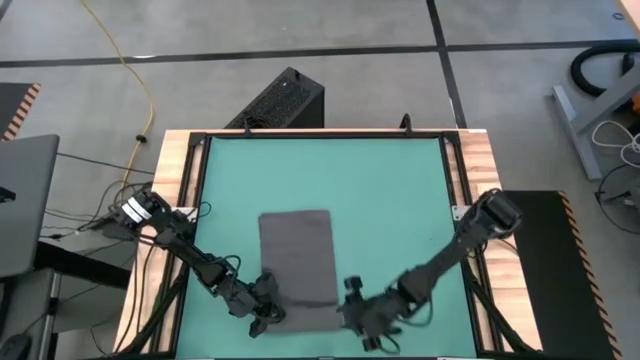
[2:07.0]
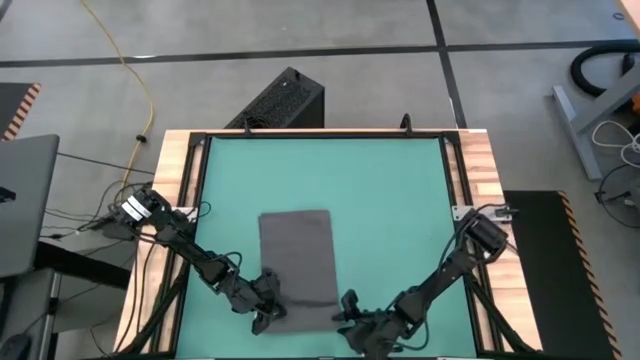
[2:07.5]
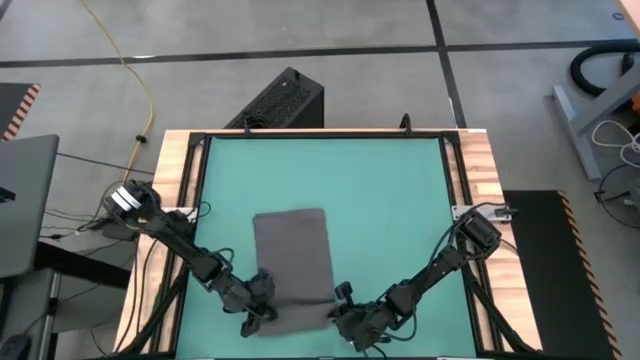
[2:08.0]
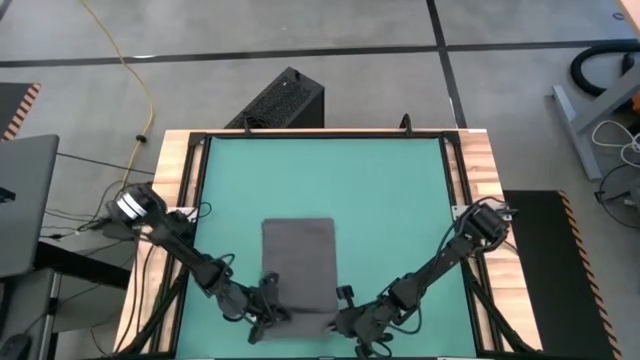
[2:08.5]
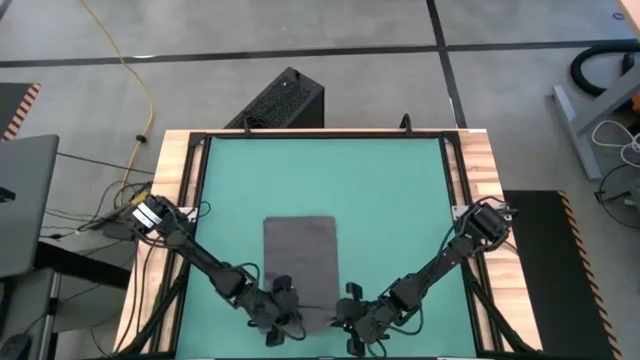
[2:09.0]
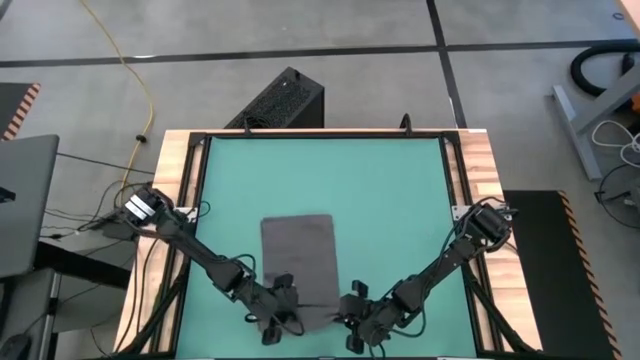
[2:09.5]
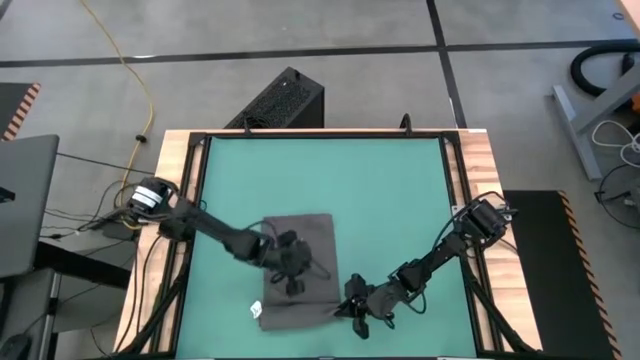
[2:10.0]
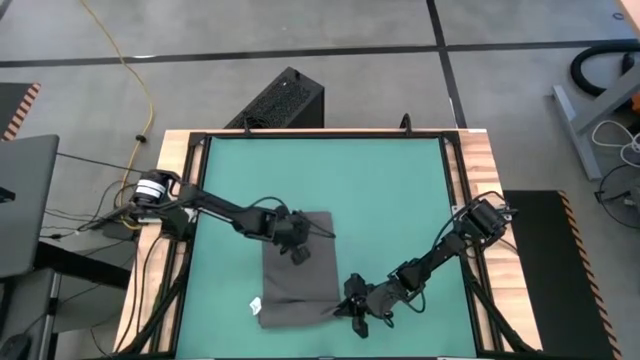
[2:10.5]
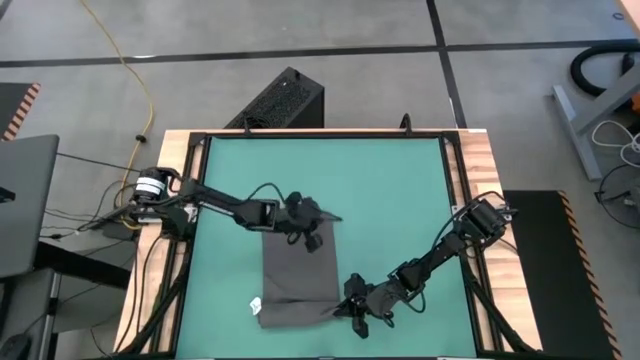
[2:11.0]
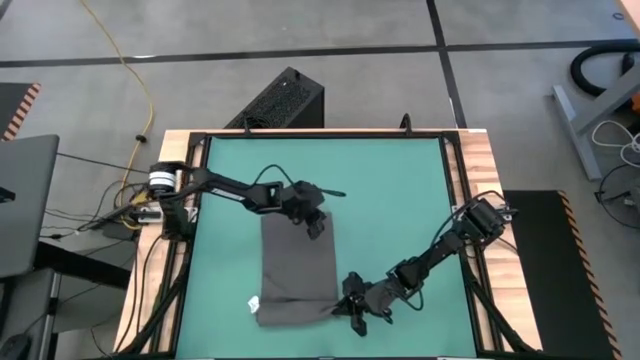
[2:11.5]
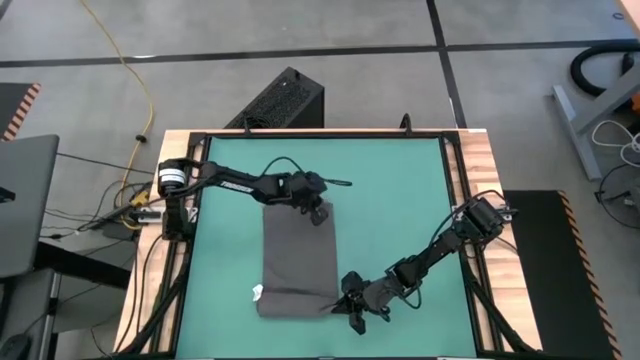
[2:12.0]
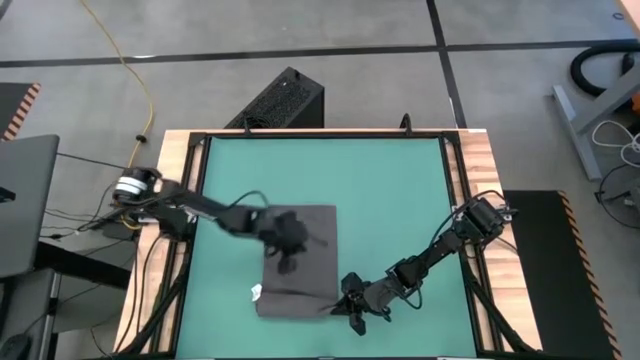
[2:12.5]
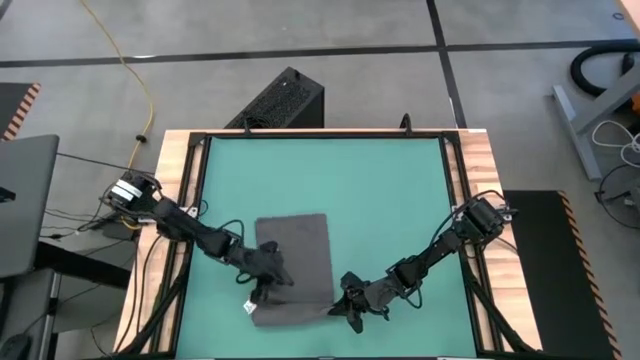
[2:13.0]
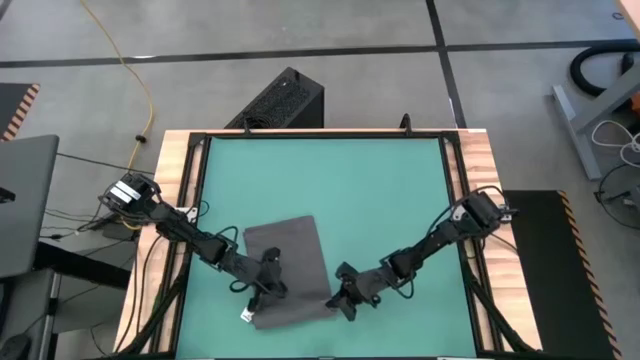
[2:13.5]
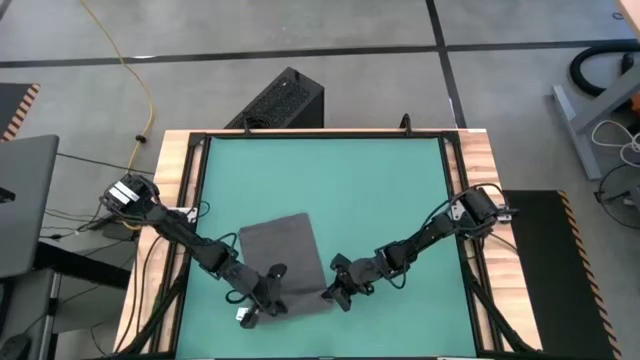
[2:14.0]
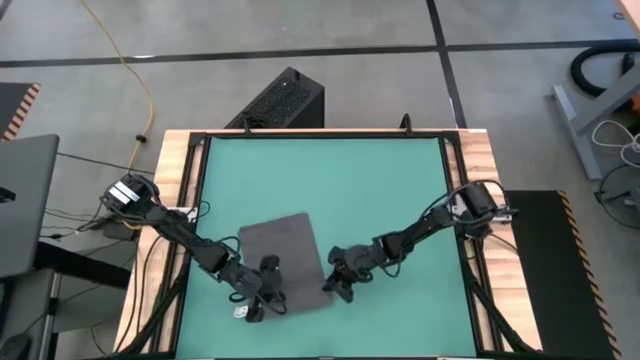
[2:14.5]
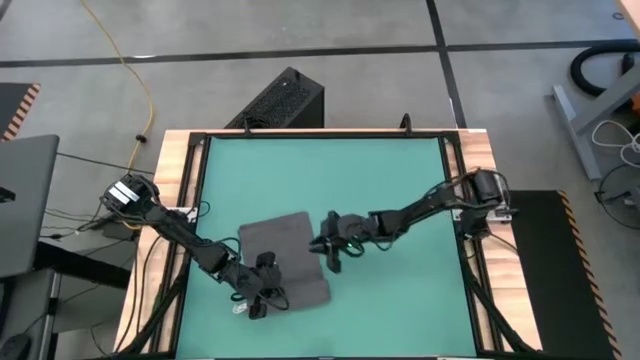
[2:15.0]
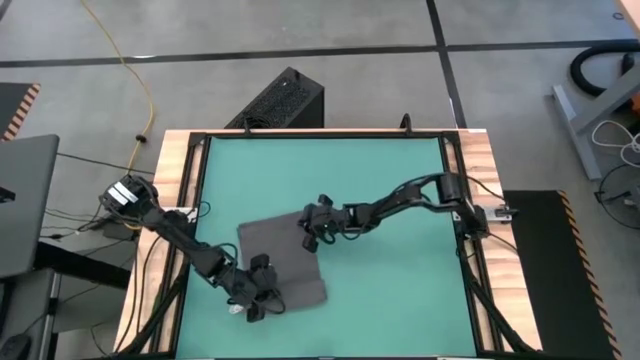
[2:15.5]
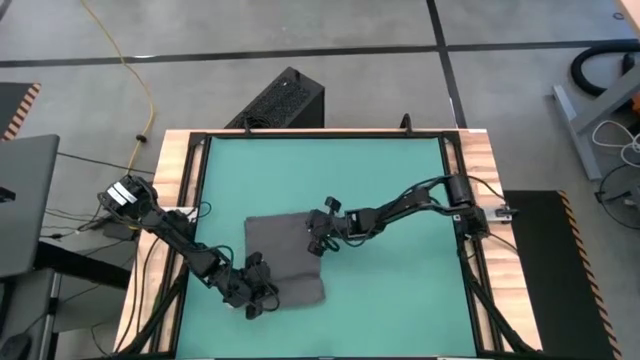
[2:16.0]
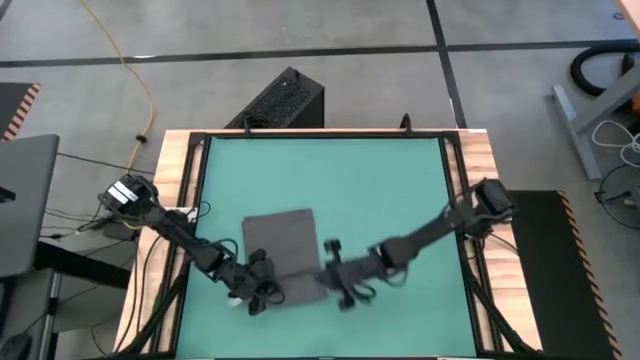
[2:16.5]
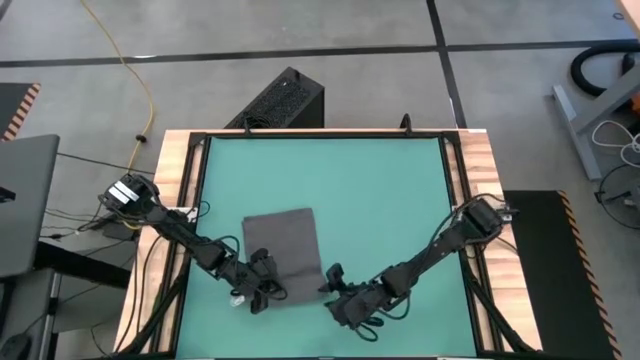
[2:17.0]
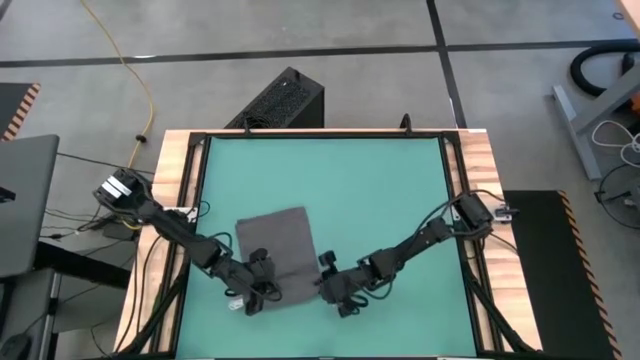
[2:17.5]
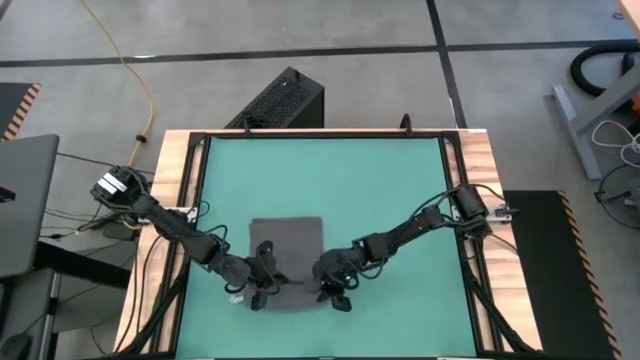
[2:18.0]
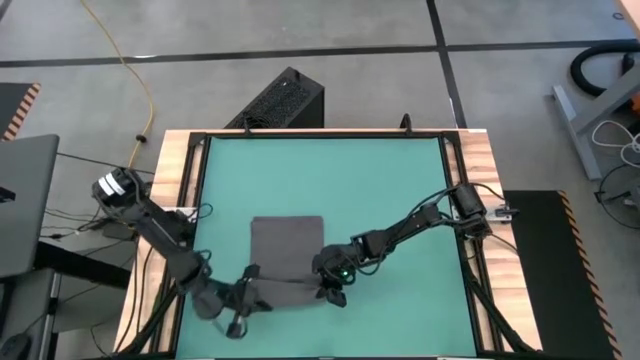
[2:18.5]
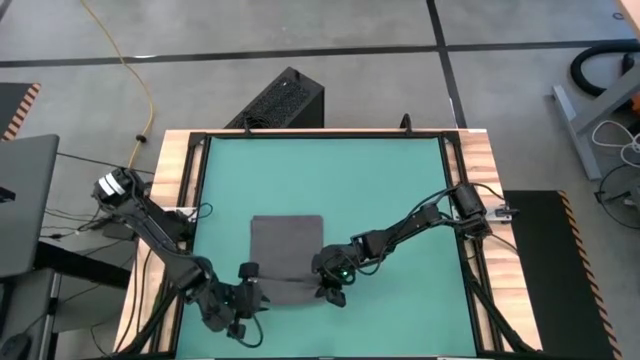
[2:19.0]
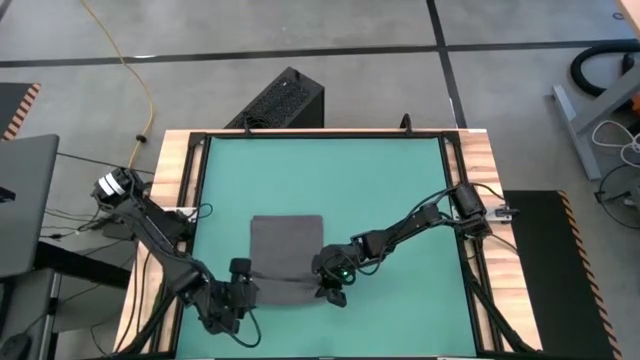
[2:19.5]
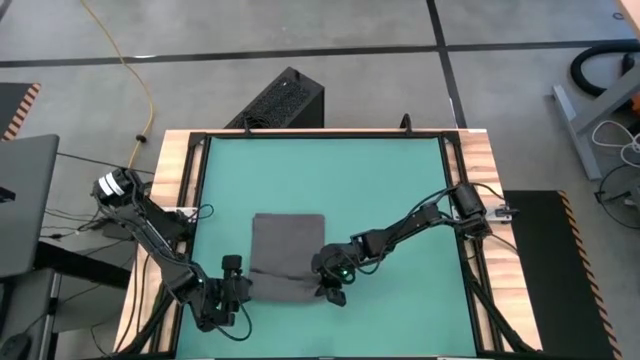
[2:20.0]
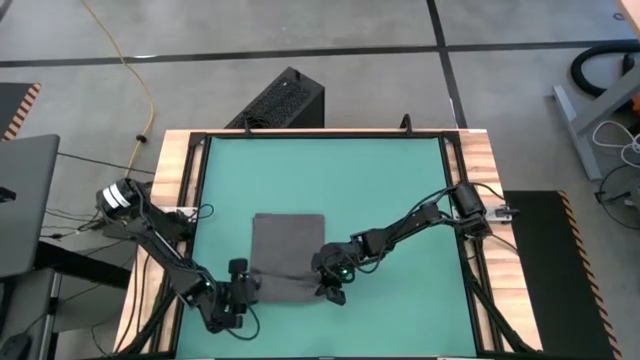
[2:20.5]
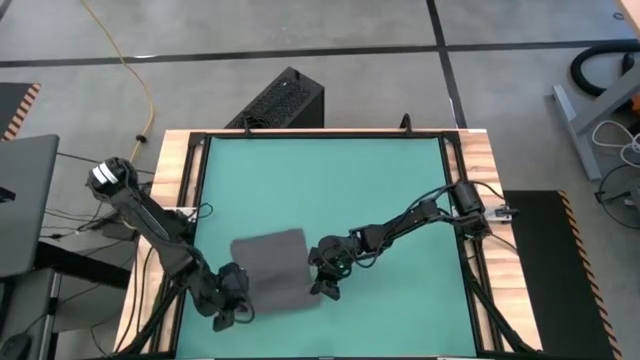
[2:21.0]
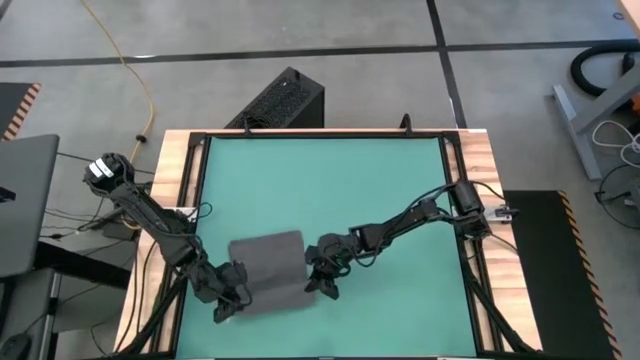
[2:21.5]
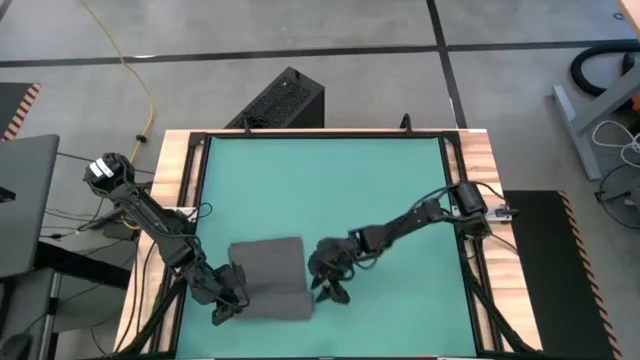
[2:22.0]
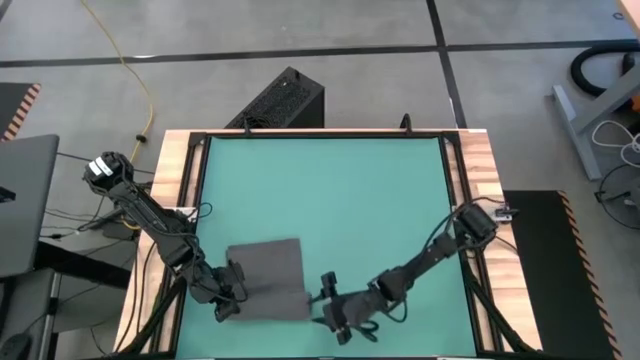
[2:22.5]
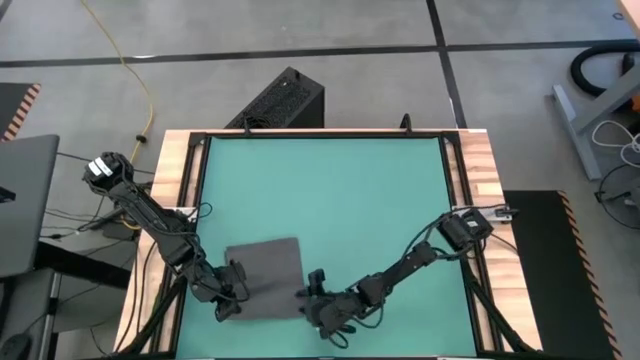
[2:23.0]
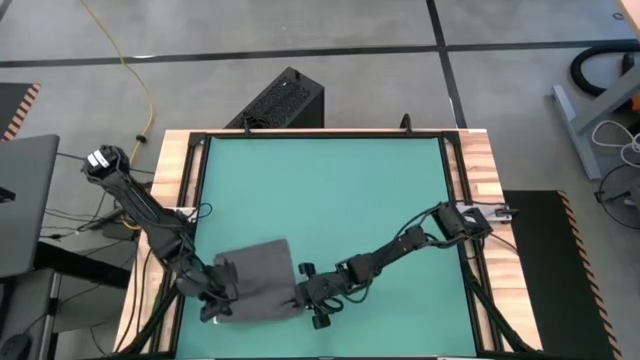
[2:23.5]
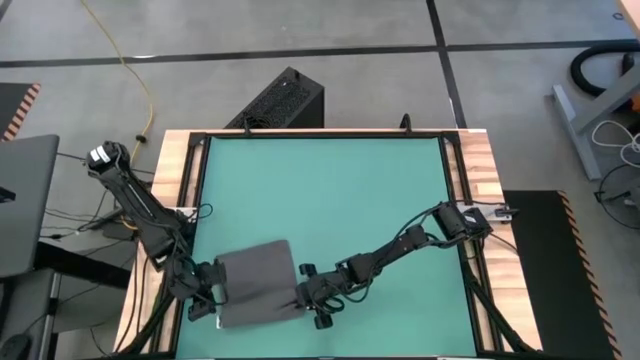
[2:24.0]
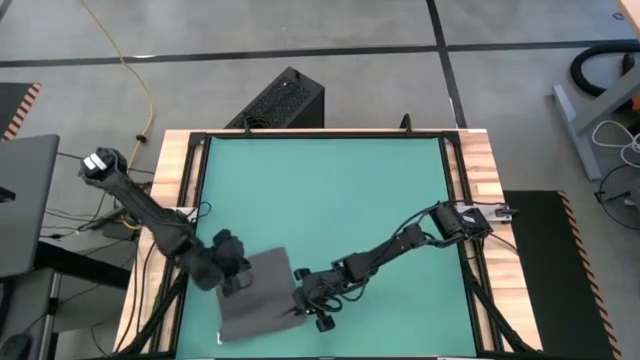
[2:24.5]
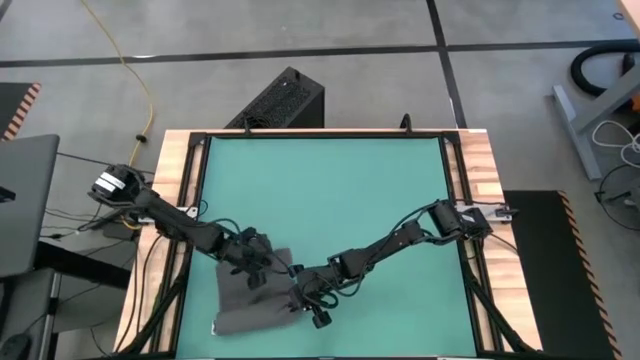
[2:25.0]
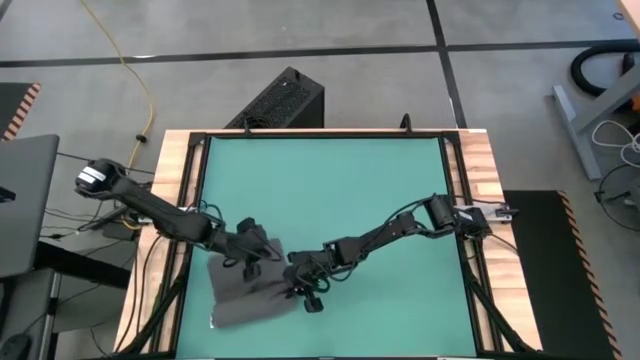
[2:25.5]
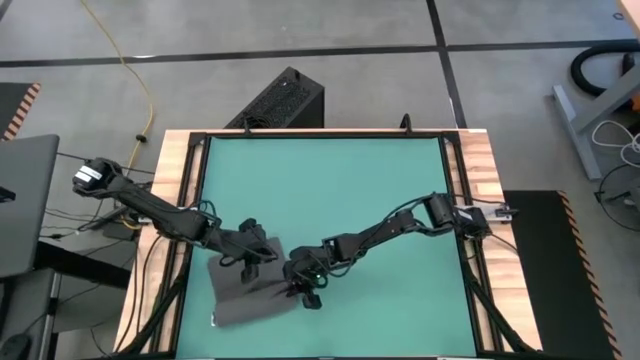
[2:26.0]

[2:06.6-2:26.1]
Task: Roll towel
Roll the gray towel

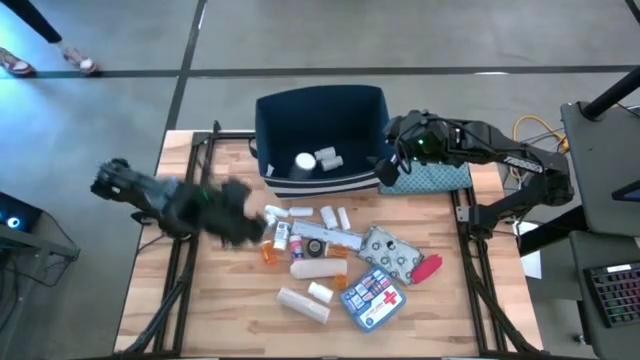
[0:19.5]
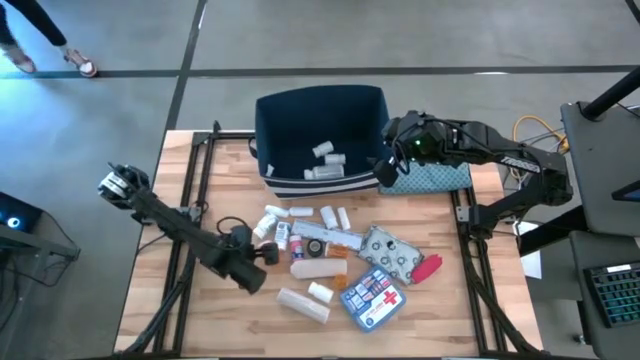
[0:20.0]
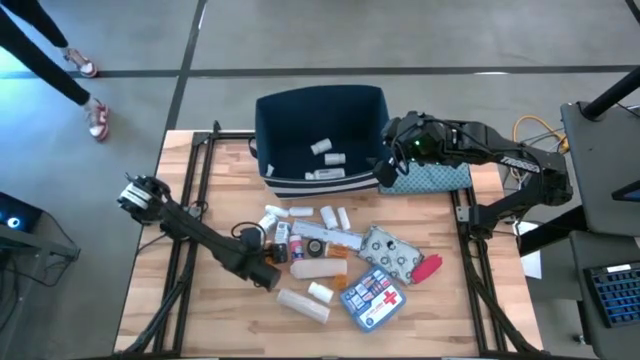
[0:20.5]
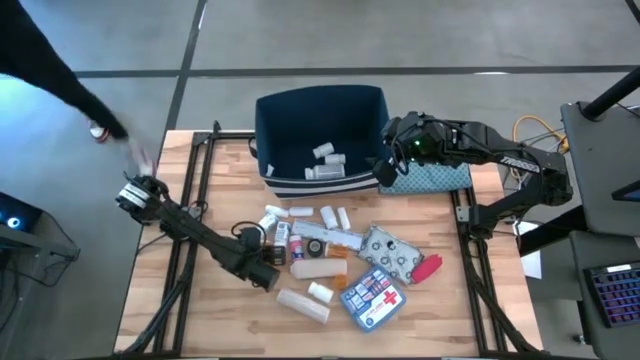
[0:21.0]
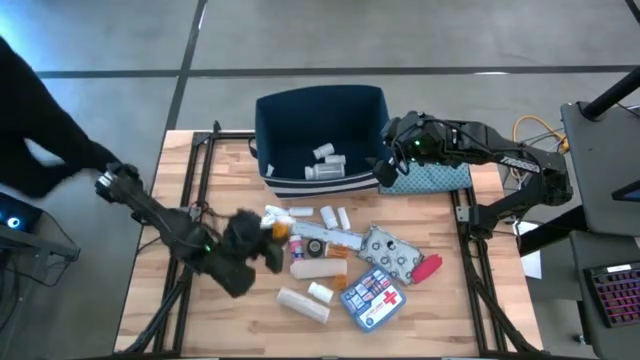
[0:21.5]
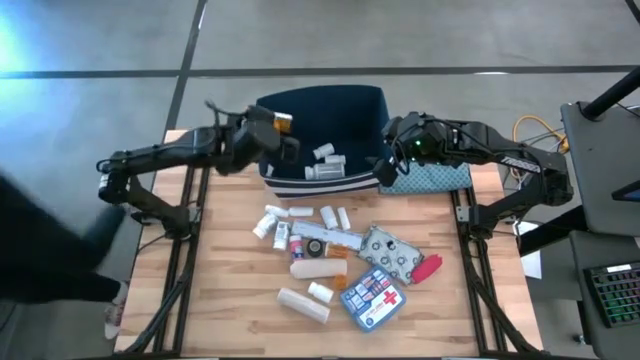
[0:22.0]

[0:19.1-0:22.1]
Task: Pick & place medical supplies in basket/bin
Put the orange medicine bottle into the blue bin
